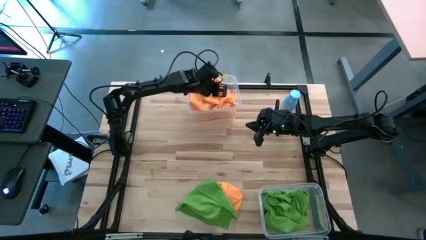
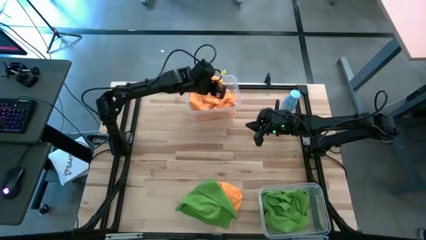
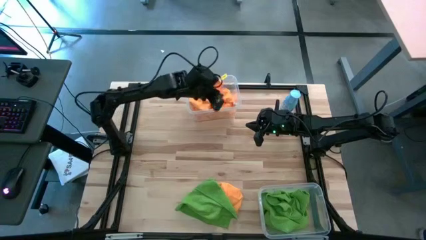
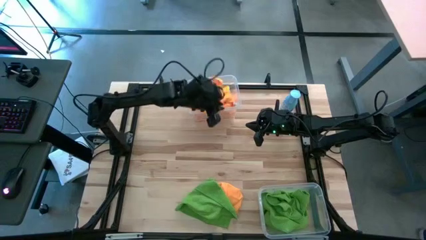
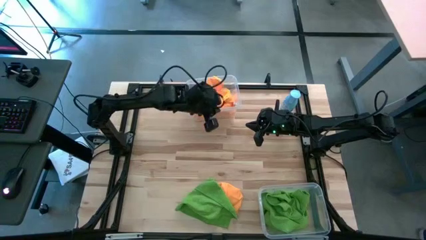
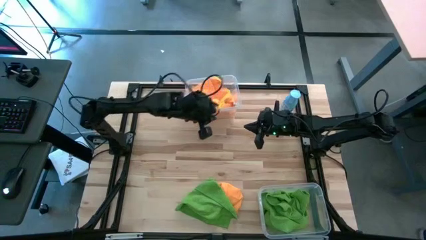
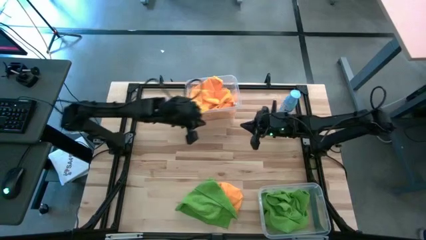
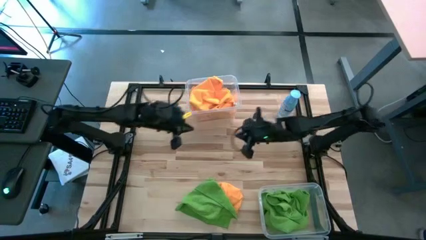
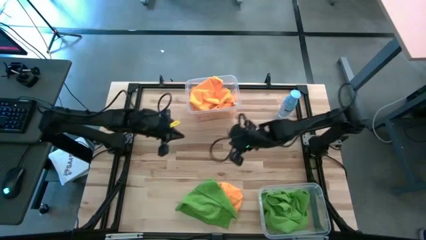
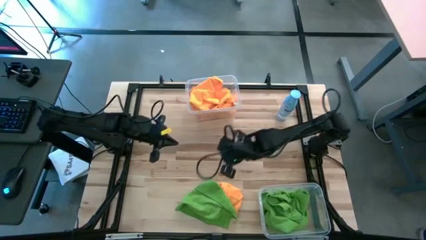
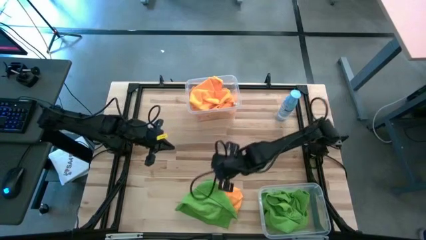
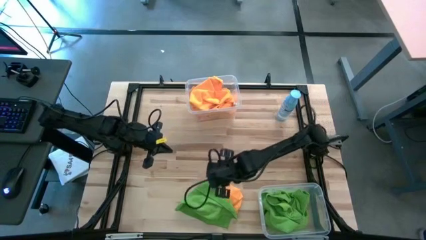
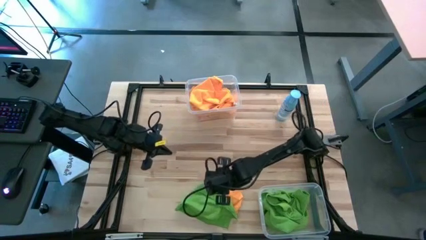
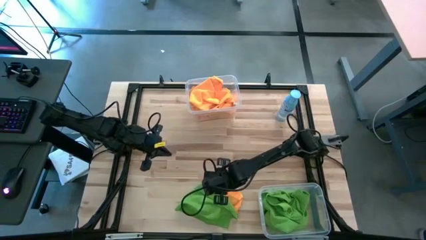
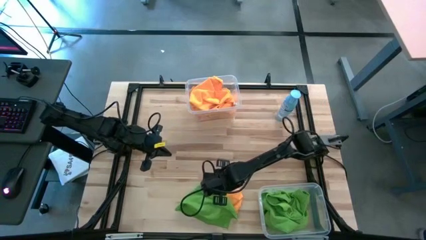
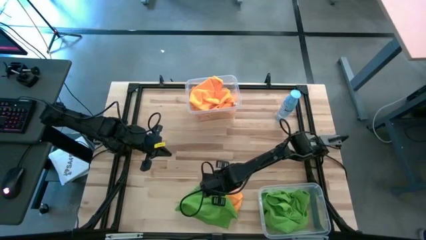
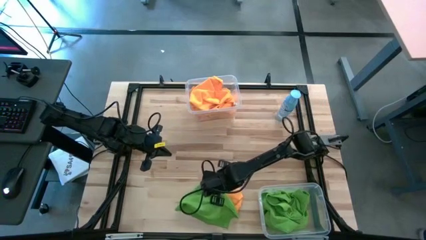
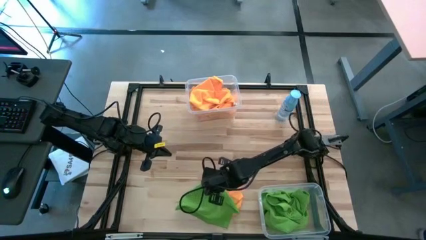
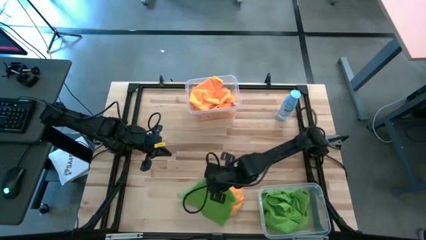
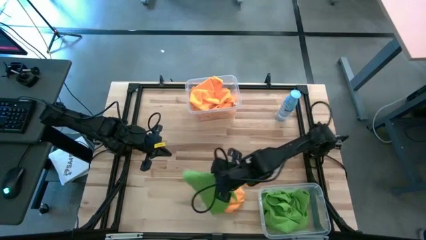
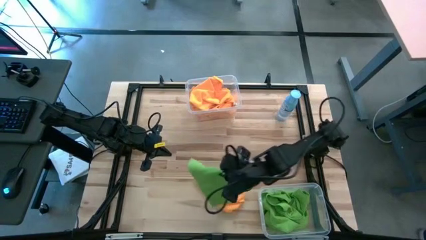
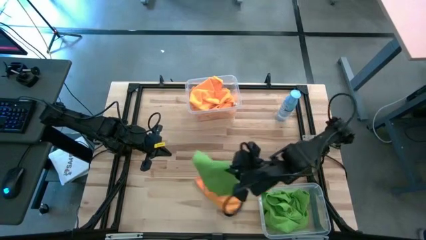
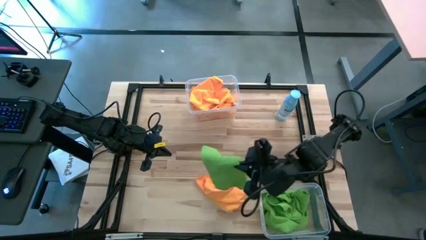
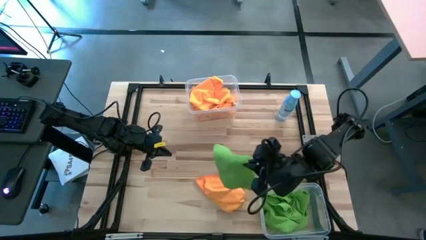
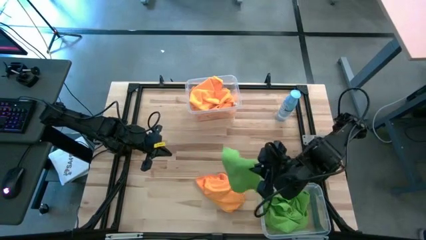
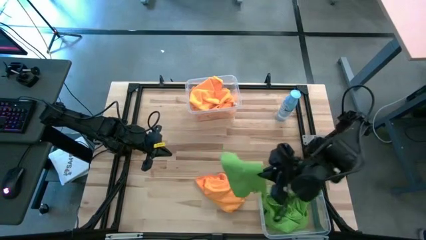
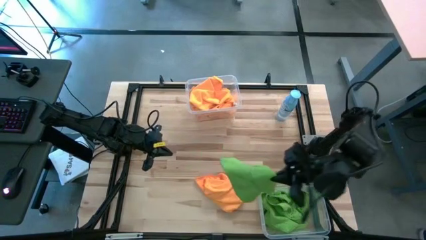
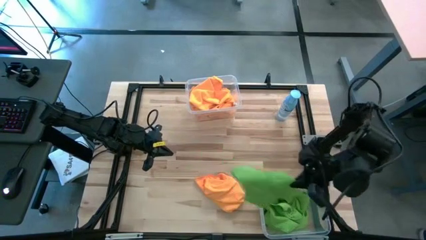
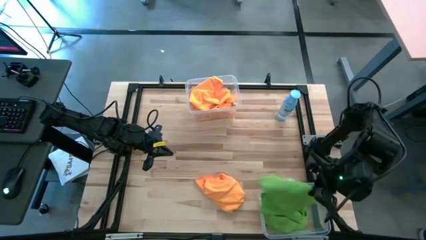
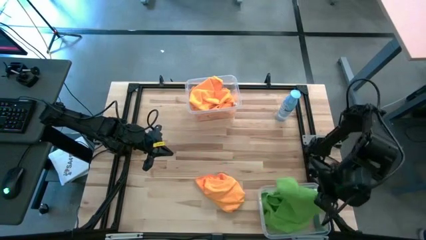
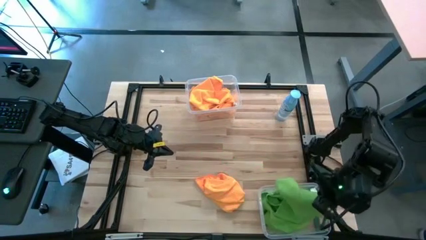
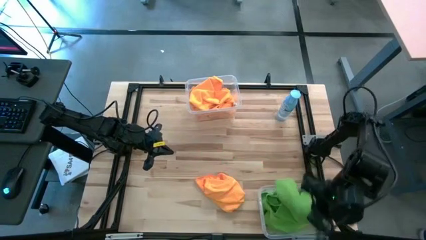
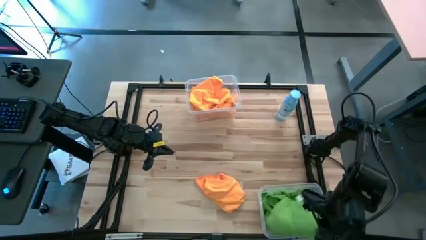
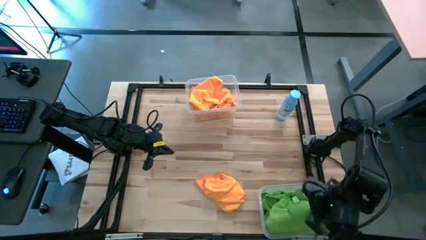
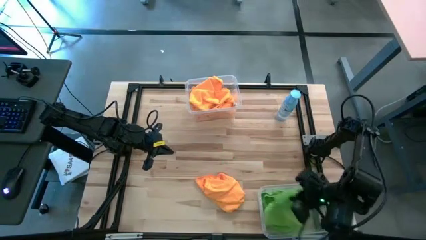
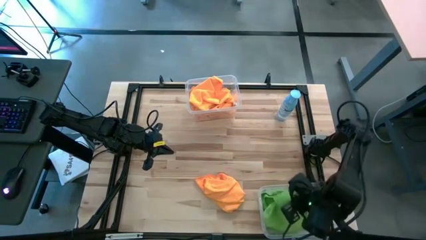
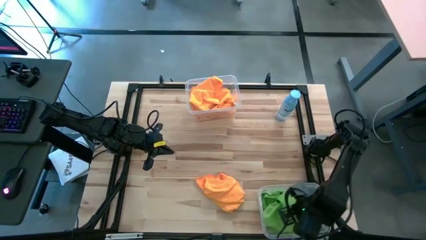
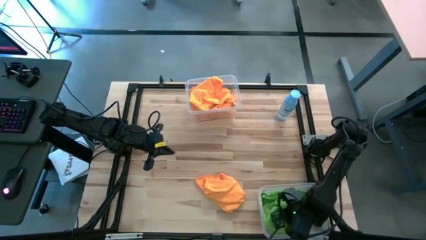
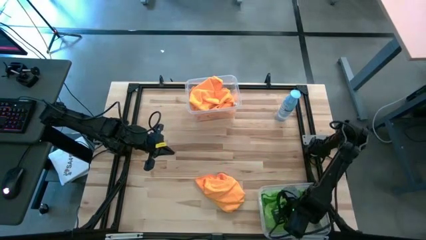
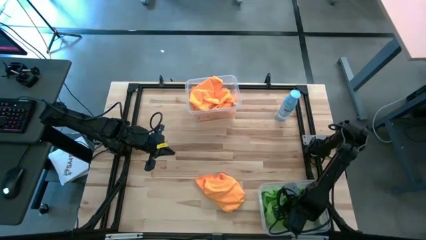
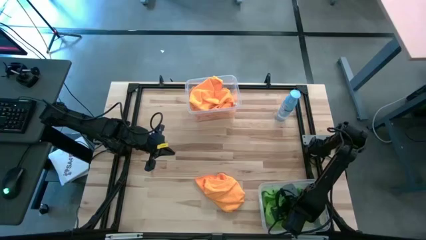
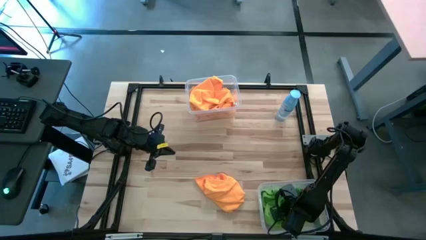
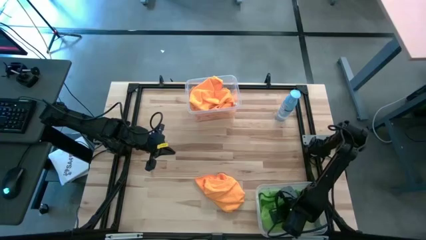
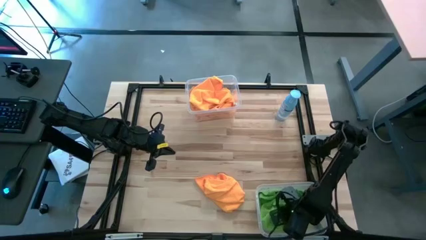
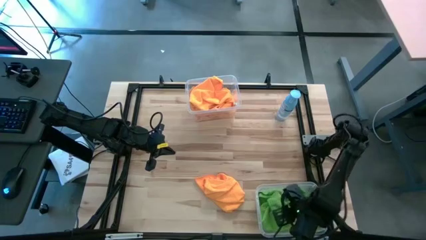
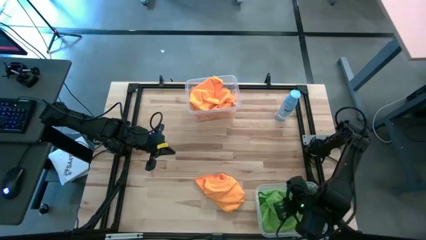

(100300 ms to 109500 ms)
Task: Sort microfiber towel by color & place in baskets
Put the green microfiber towel into the bottom transparent bin

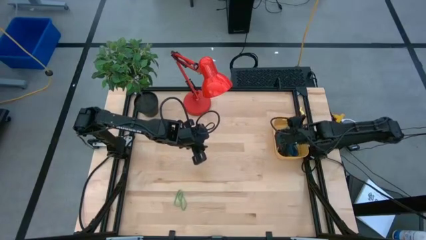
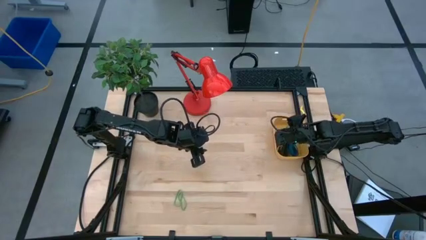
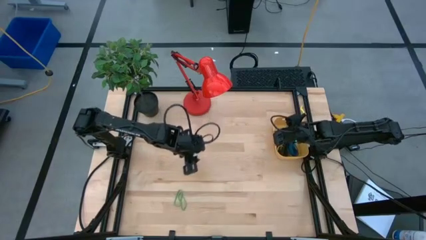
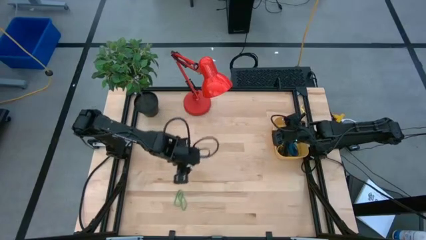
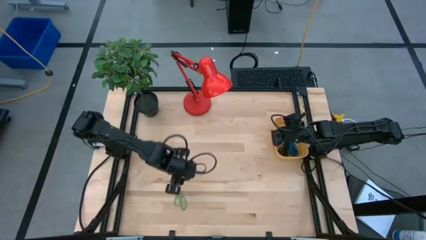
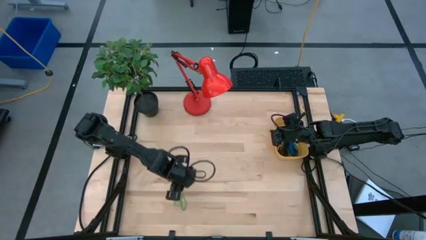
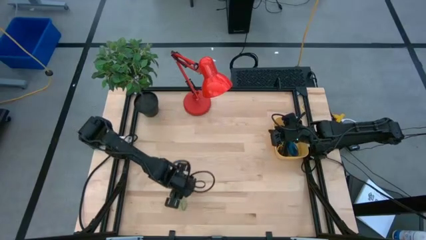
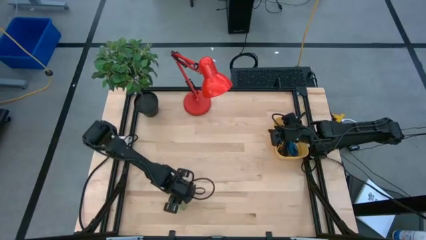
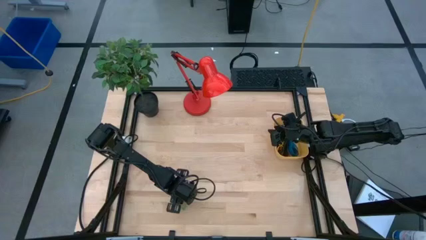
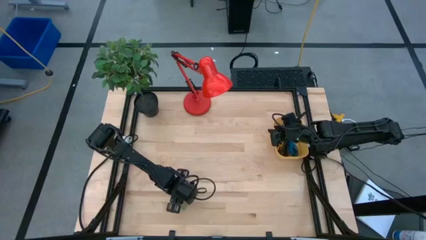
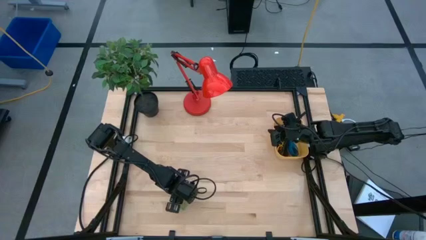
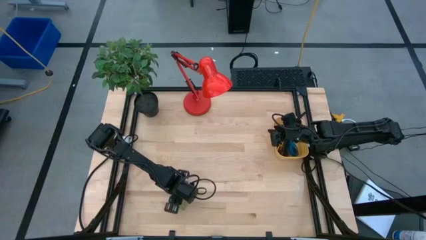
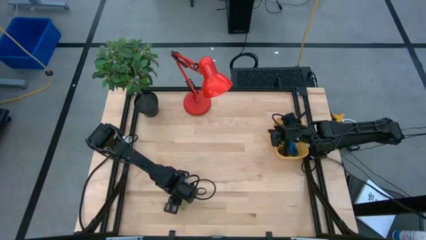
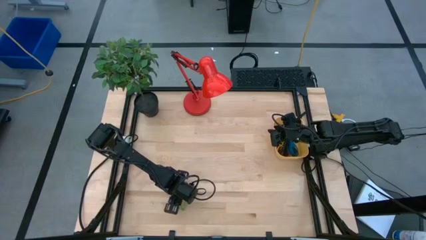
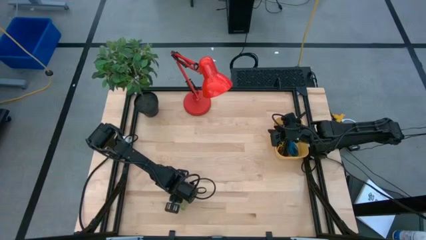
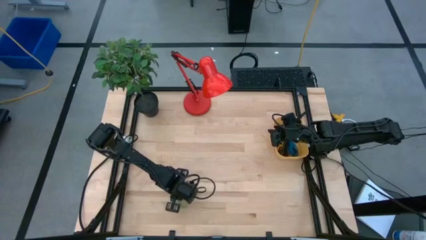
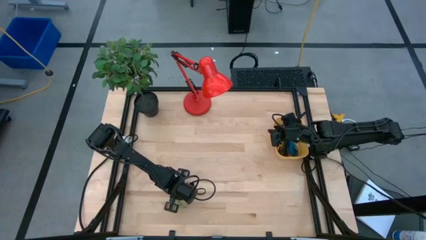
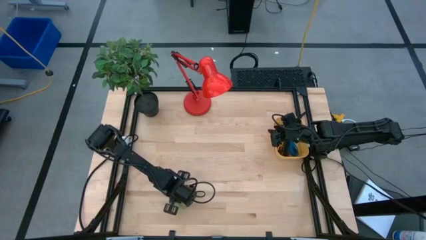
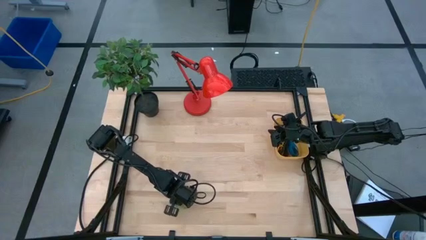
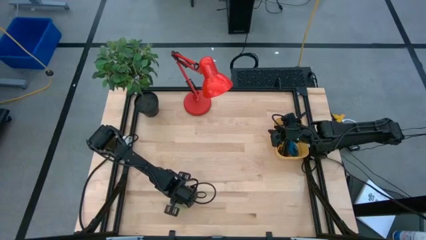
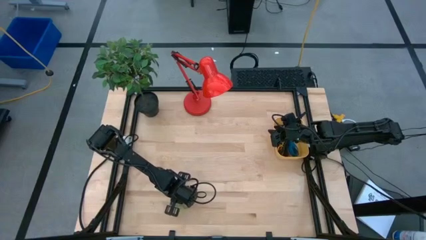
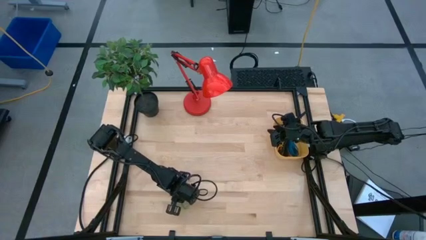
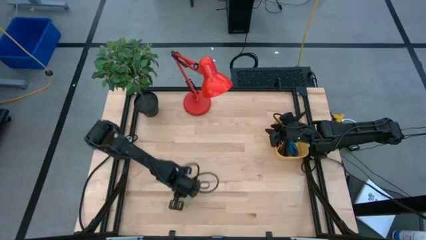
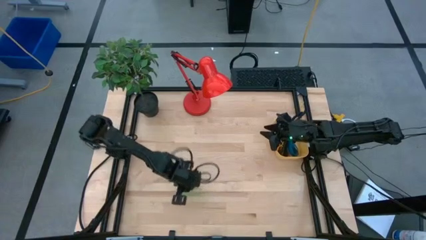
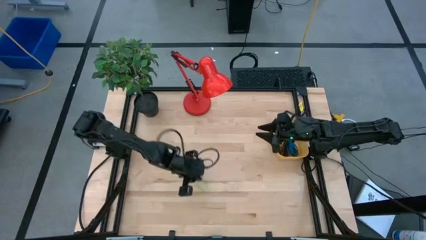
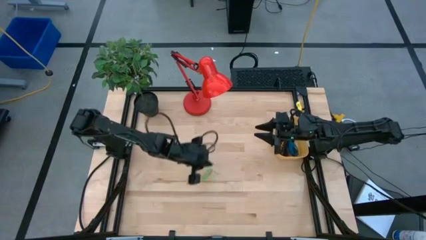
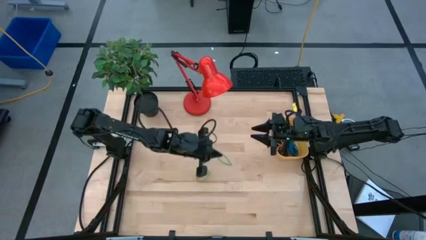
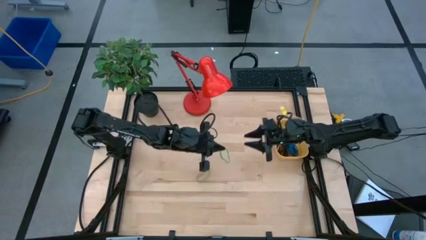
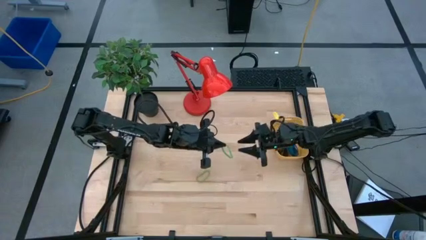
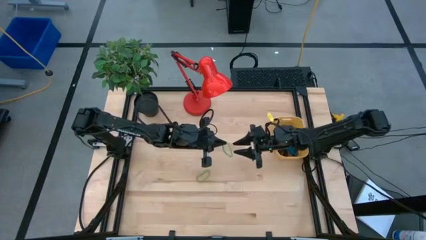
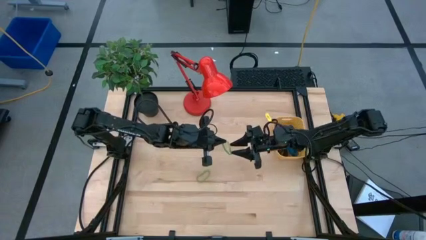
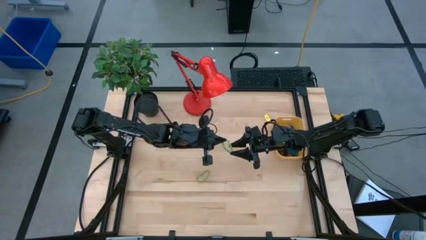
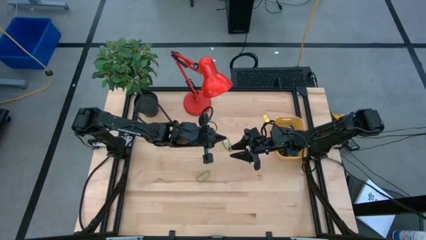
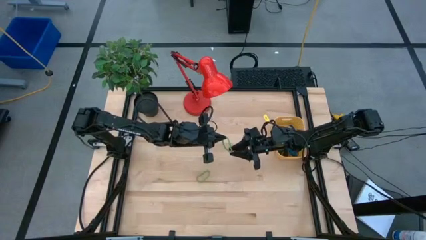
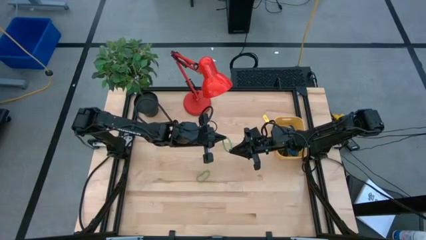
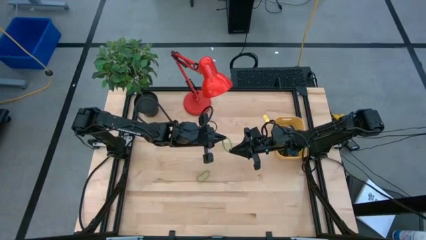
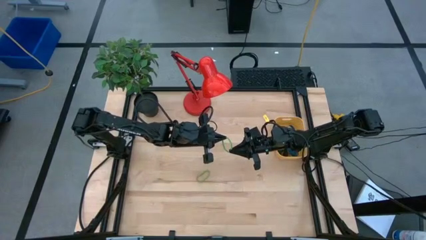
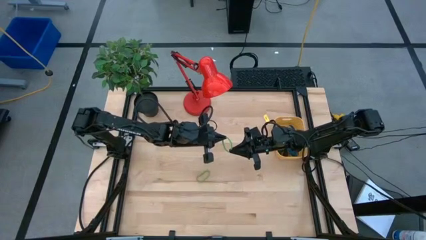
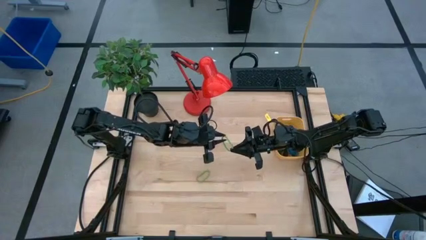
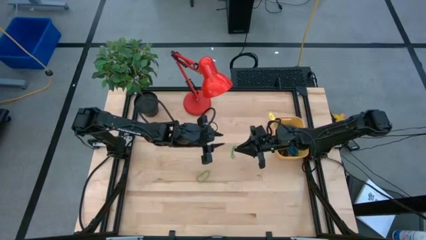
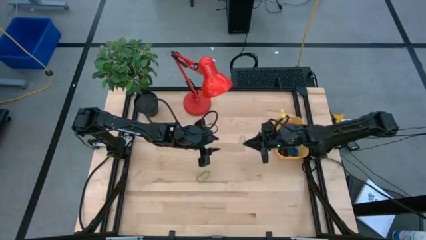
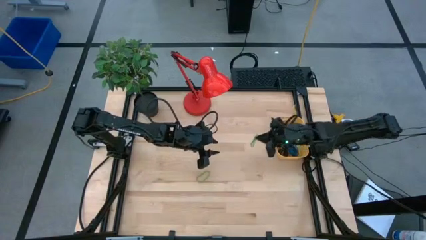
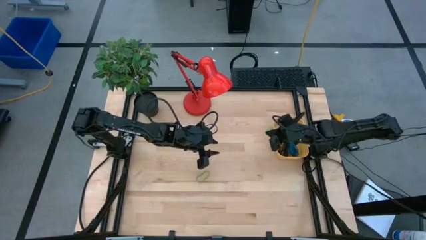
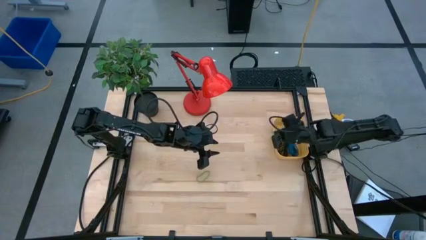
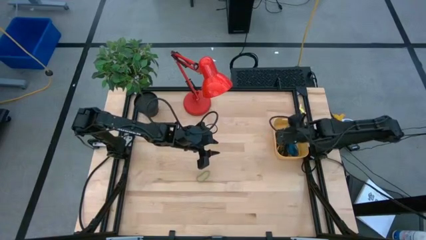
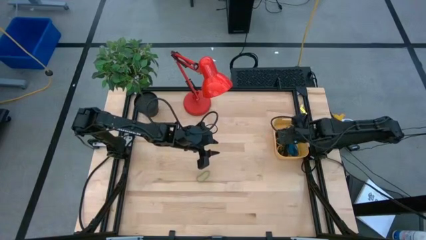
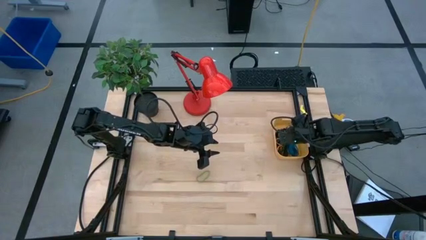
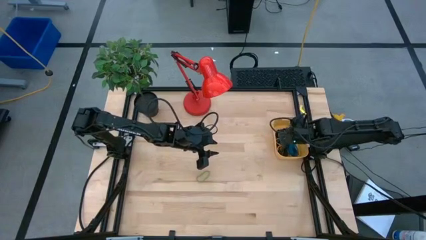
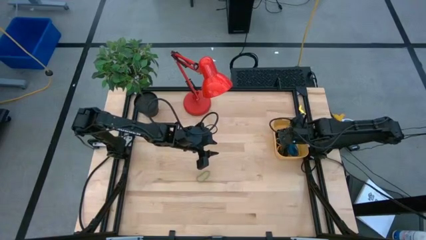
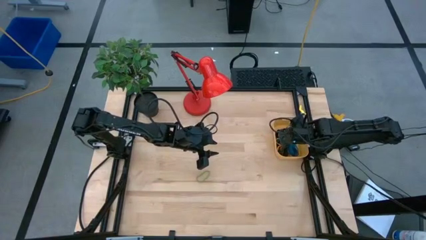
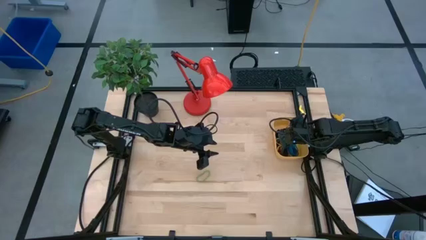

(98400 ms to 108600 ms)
Task: Pick and place rubber bands into bin
Put the left green rubber band into the yellow bin
